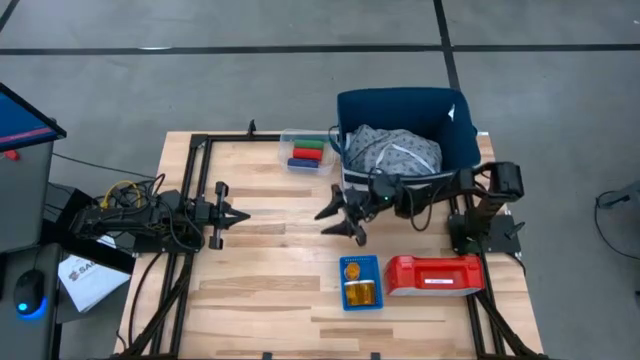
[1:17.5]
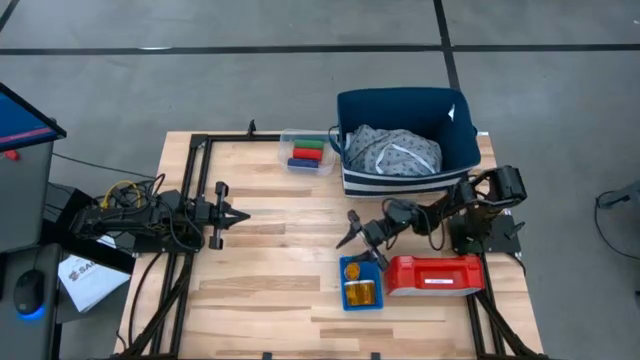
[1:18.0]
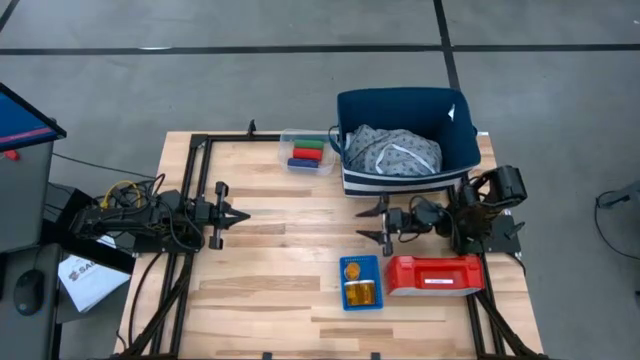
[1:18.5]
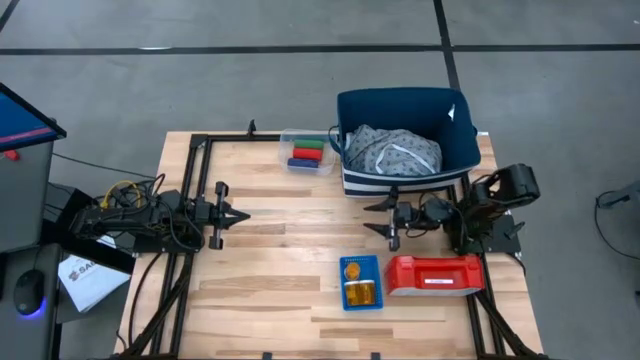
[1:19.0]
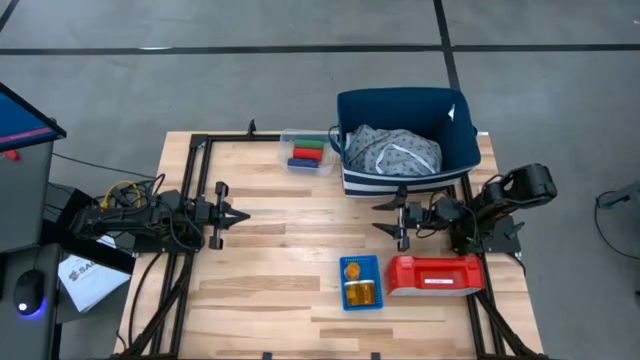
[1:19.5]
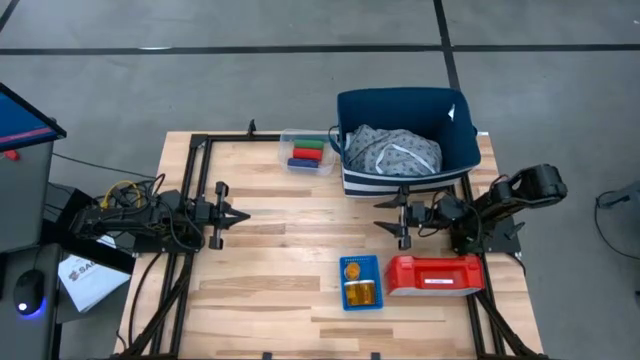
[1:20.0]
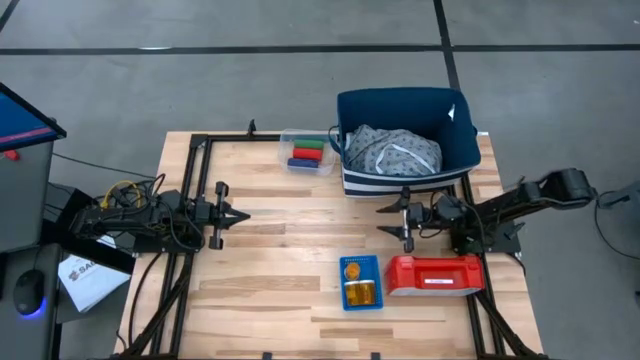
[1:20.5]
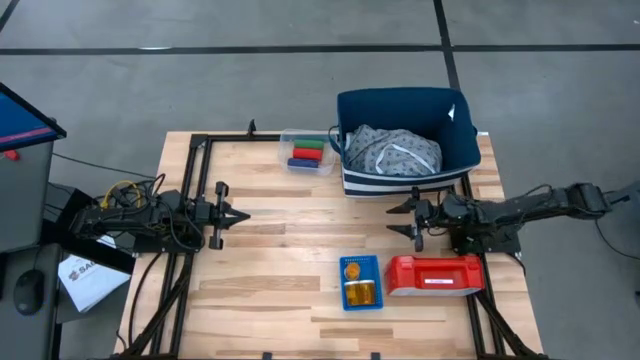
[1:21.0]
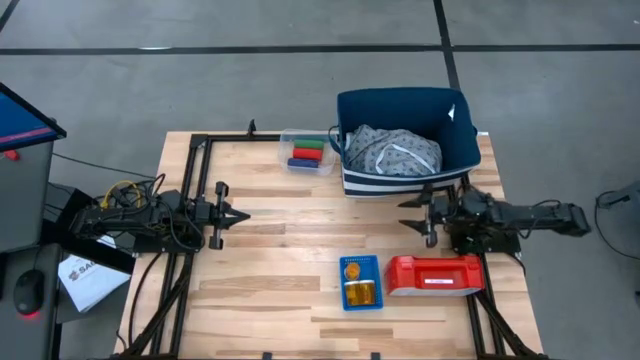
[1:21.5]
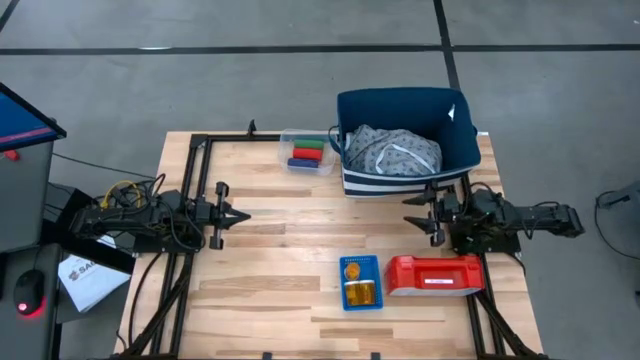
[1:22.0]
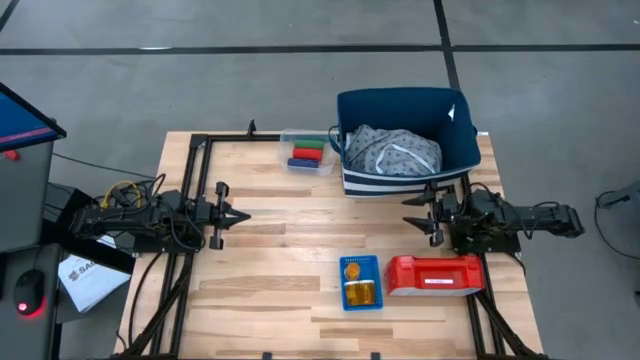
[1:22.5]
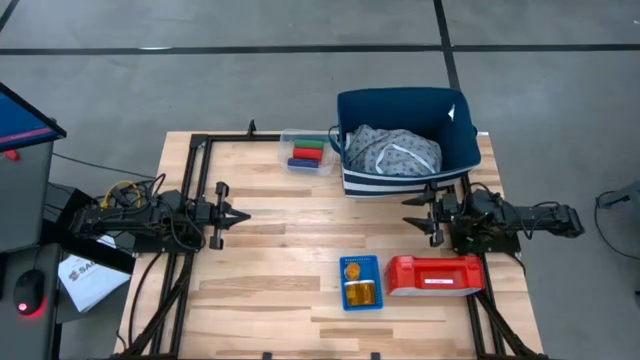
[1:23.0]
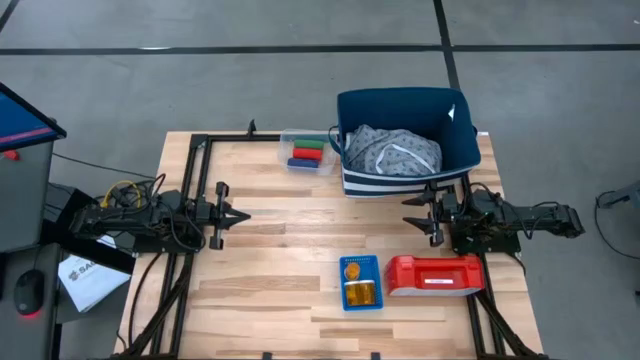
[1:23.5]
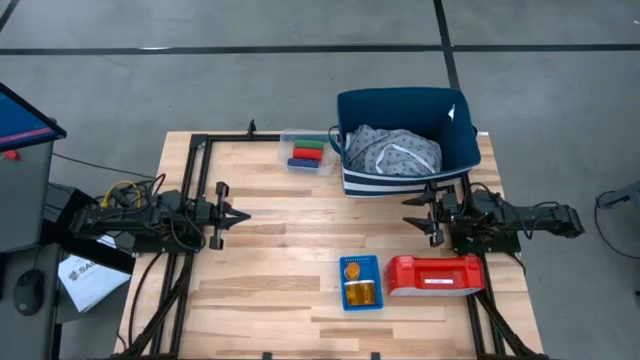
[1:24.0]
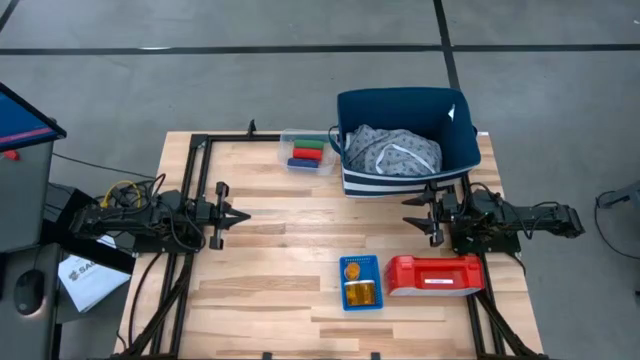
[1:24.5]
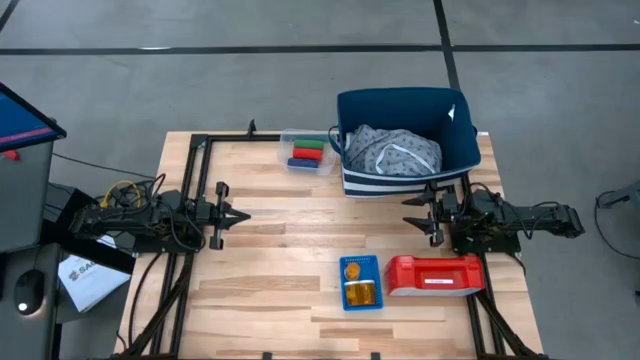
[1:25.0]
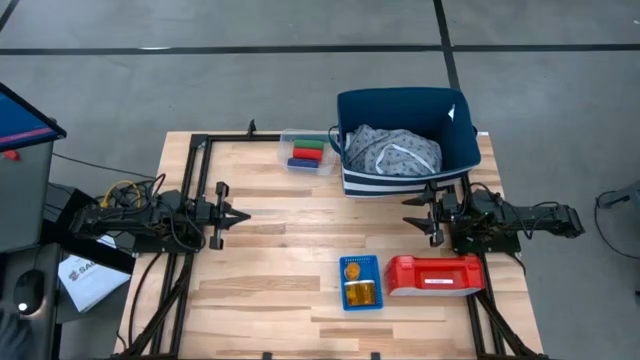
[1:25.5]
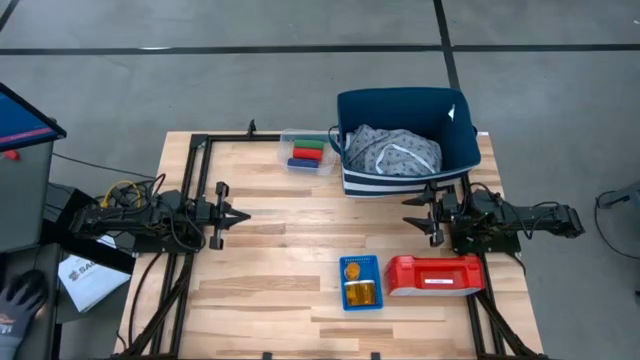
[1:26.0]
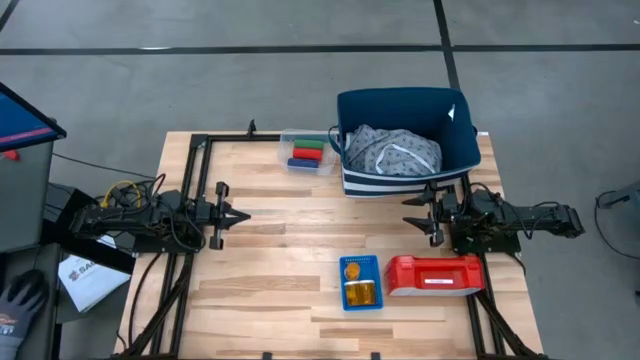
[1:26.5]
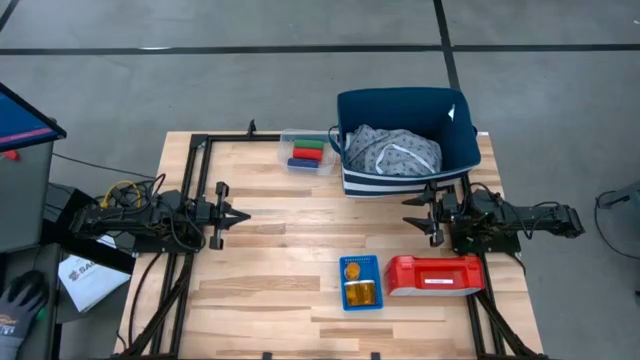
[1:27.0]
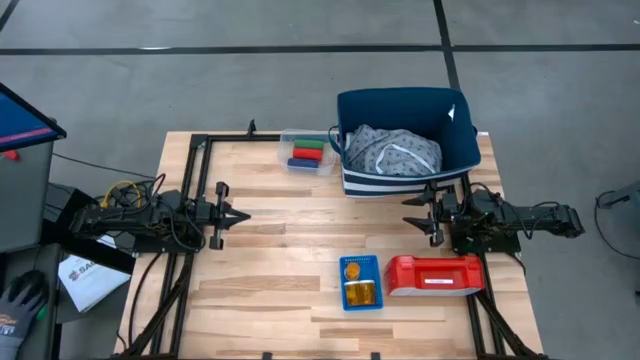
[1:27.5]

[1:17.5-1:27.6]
Task: Pick & Place Medicine items
Return to Home Position

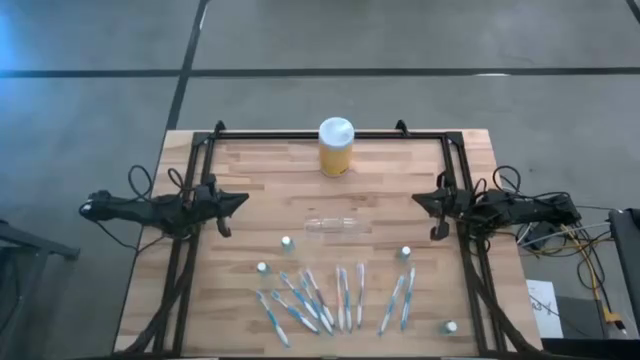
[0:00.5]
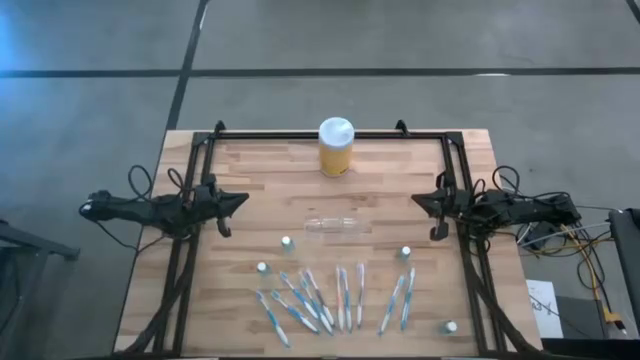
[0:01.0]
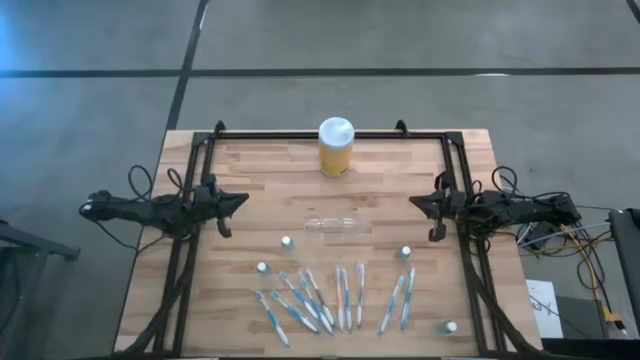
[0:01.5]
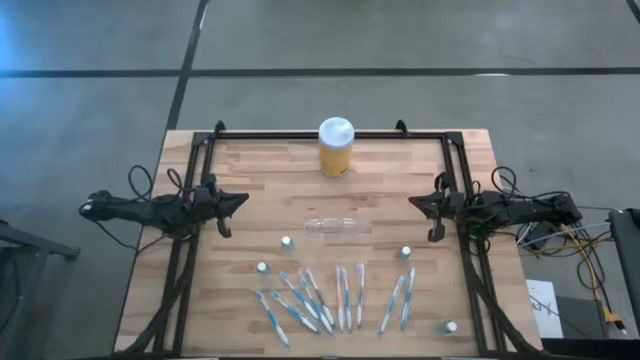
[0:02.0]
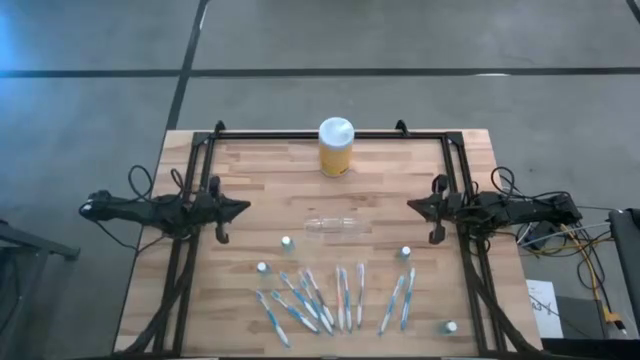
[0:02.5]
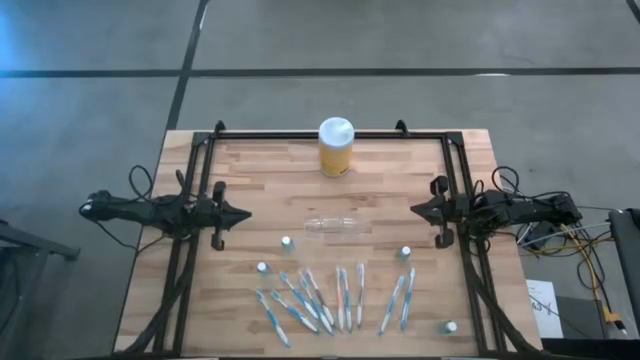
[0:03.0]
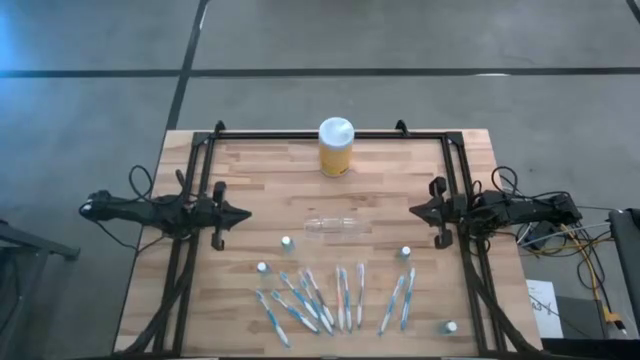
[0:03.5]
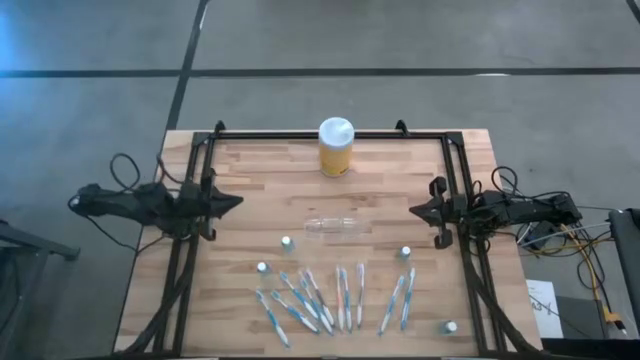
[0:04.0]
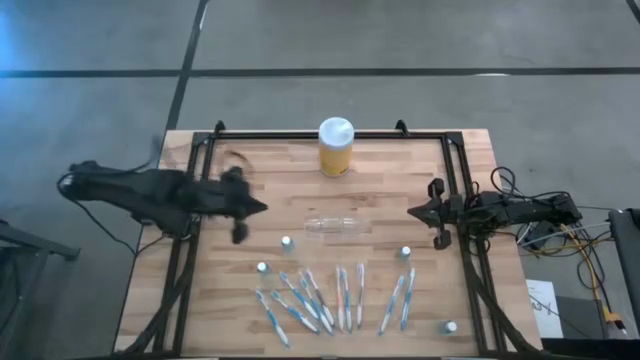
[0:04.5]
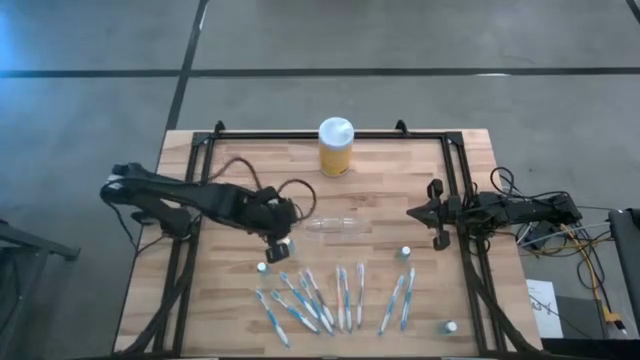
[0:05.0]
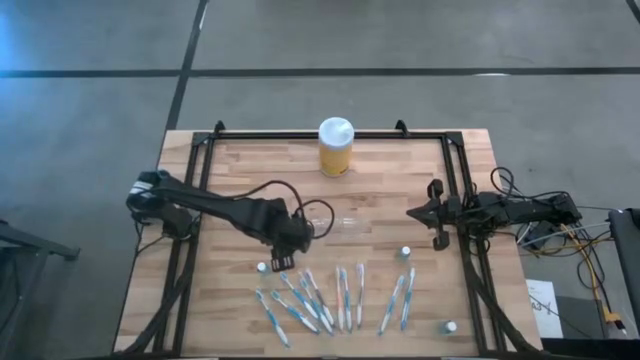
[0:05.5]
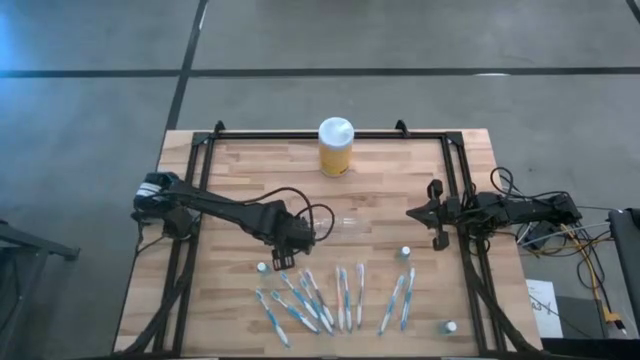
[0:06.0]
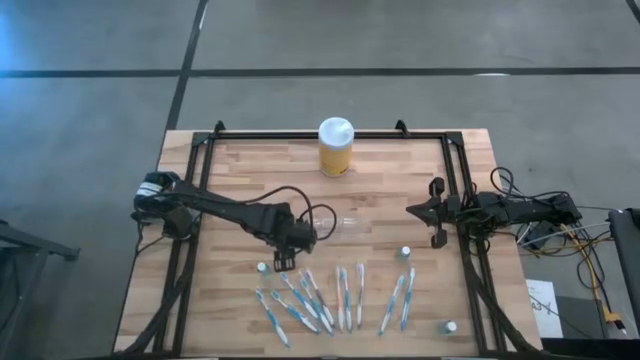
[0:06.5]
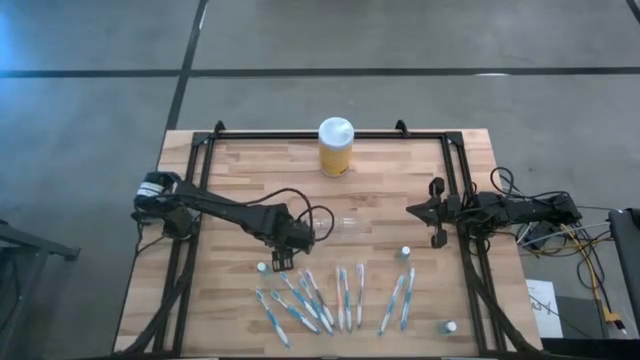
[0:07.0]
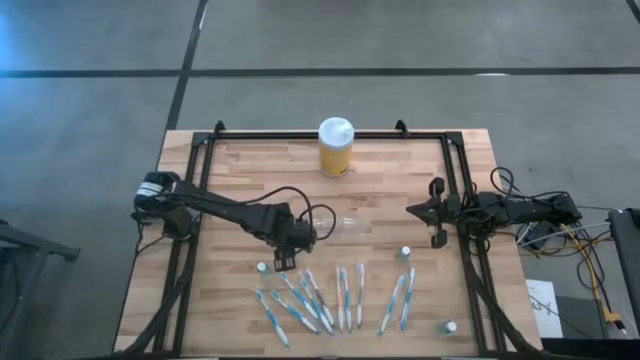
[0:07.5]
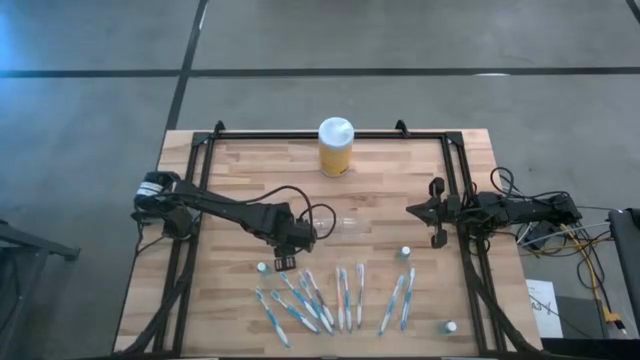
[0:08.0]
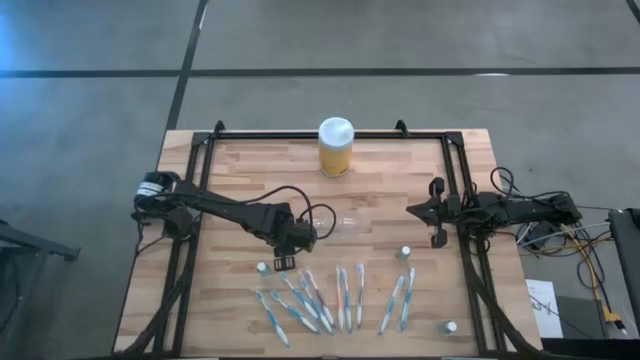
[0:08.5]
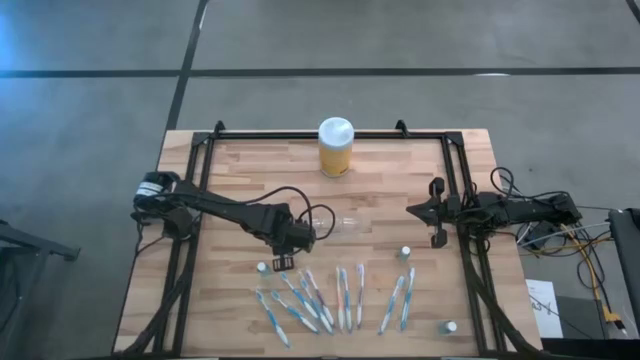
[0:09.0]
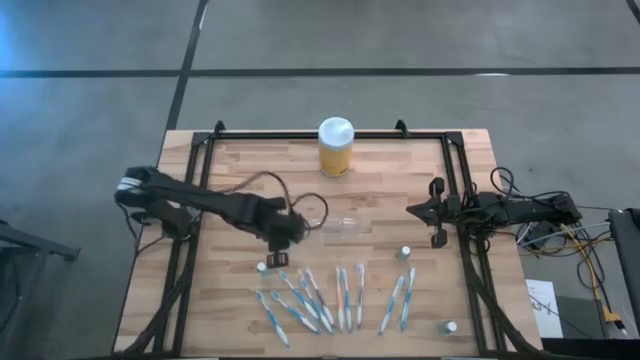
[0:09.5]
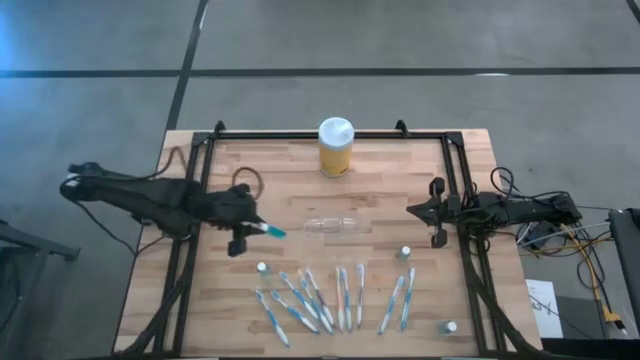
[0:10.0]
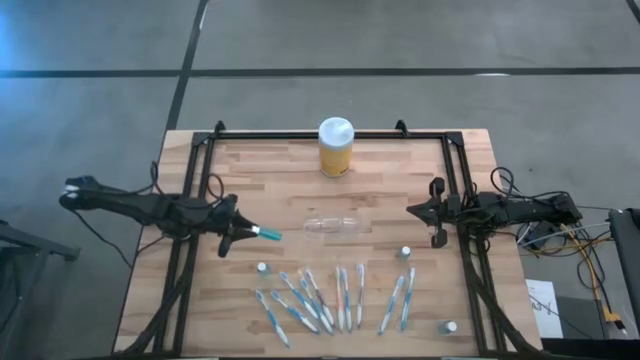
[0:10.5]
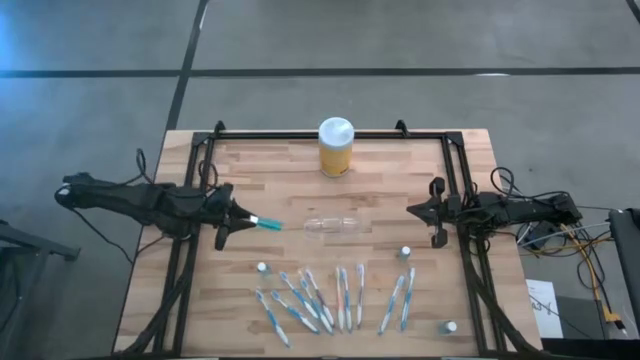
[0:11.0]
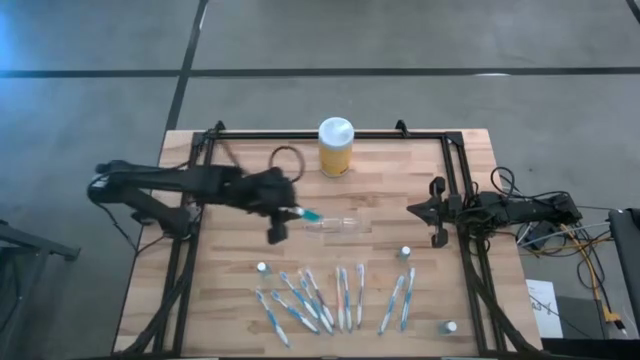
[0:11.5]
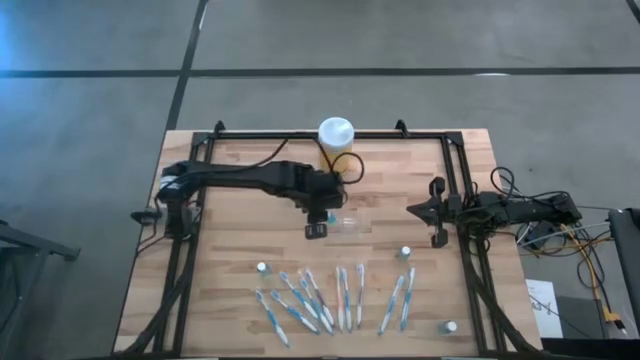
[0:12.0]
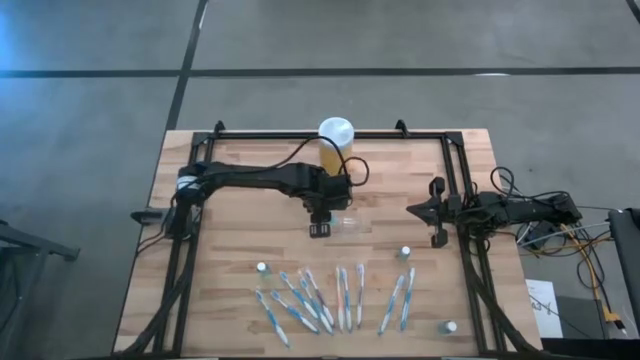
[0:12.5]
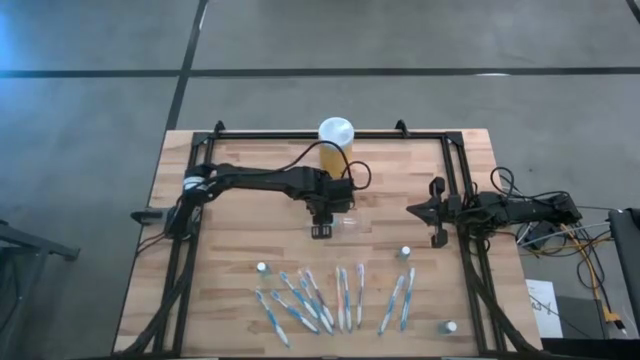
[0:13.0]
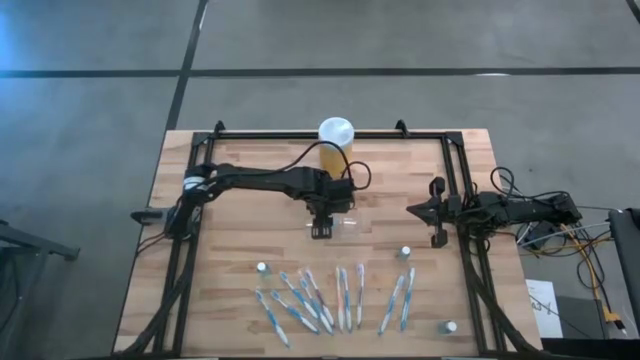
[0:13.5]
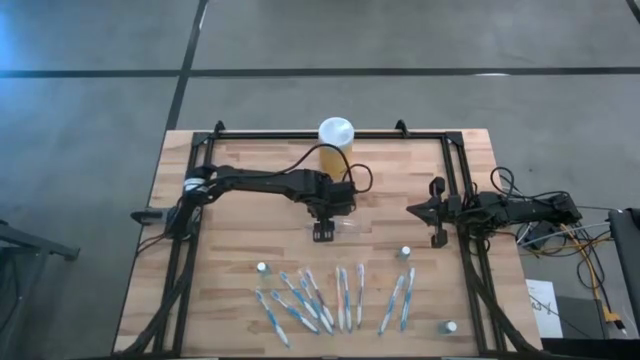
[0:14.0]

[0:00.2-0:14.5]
Task: Pick & Place toothbrushing station
Put the blue mouthwash into the transparent organizer
